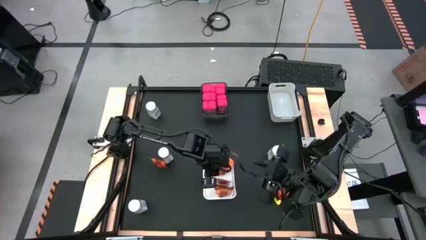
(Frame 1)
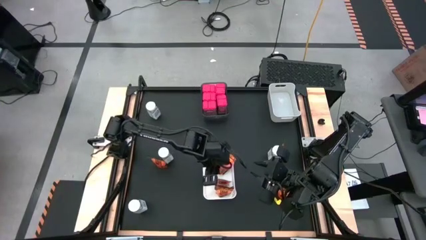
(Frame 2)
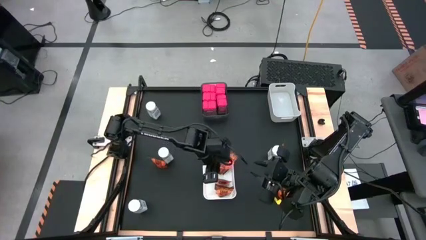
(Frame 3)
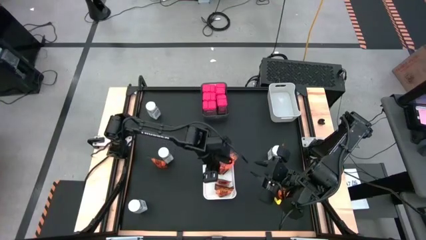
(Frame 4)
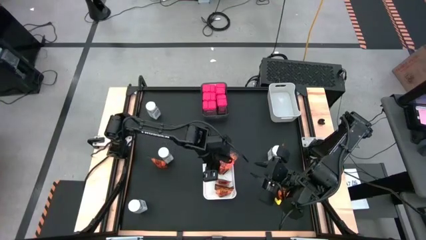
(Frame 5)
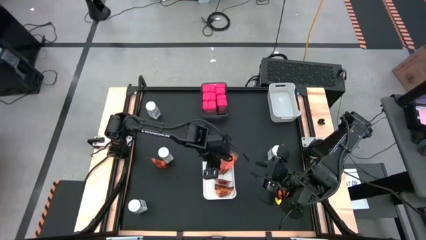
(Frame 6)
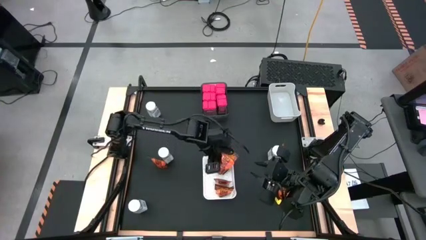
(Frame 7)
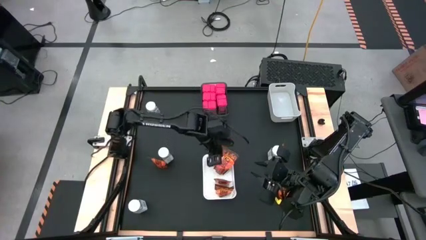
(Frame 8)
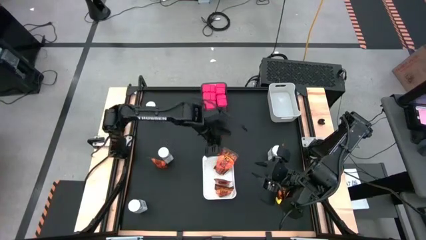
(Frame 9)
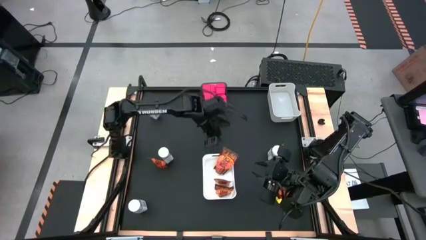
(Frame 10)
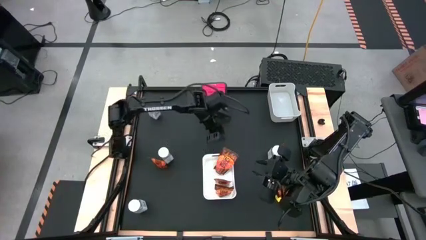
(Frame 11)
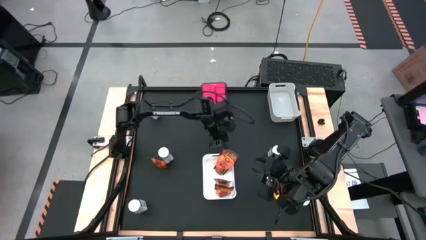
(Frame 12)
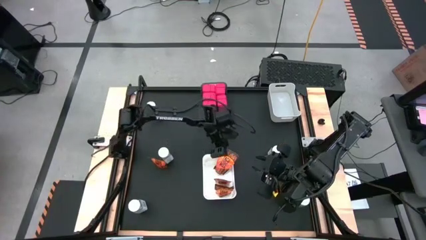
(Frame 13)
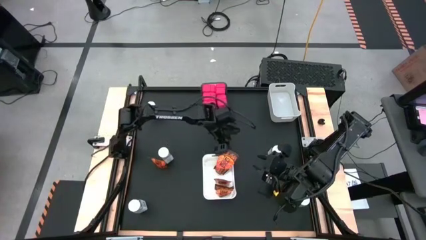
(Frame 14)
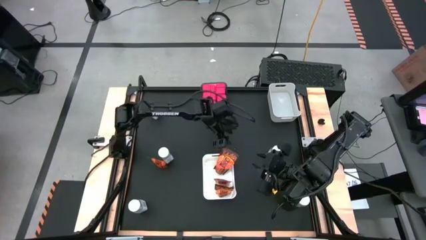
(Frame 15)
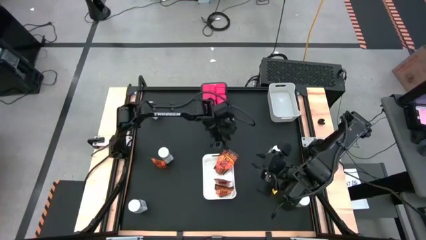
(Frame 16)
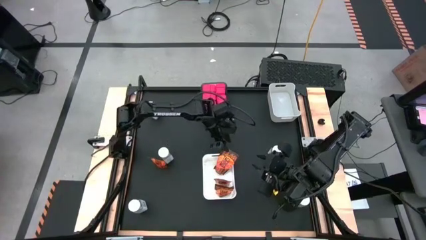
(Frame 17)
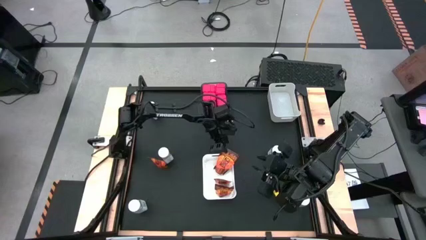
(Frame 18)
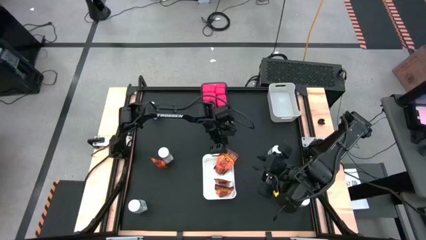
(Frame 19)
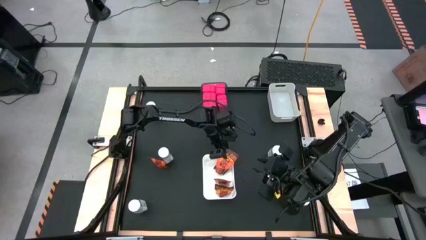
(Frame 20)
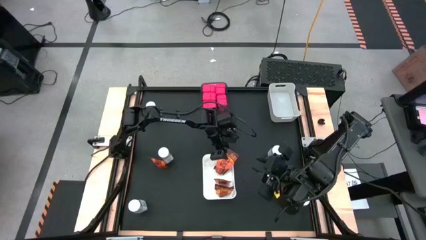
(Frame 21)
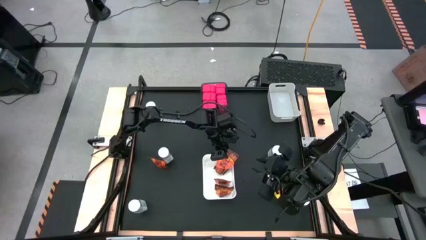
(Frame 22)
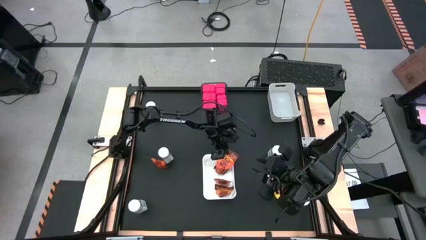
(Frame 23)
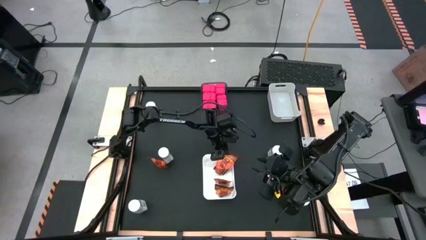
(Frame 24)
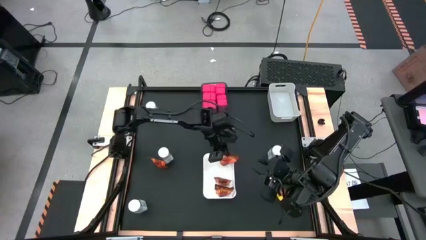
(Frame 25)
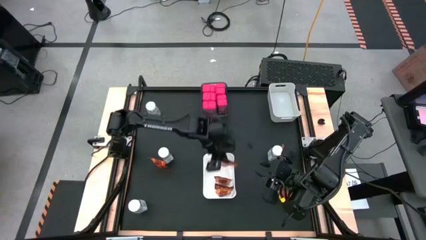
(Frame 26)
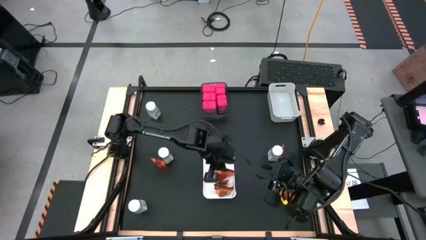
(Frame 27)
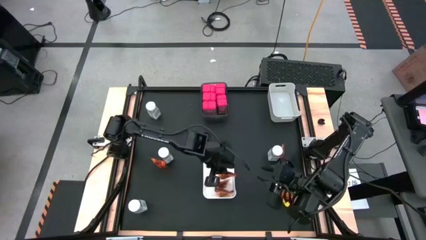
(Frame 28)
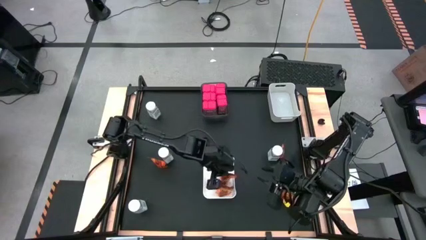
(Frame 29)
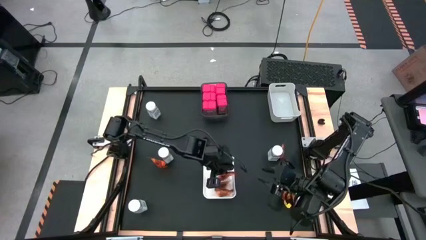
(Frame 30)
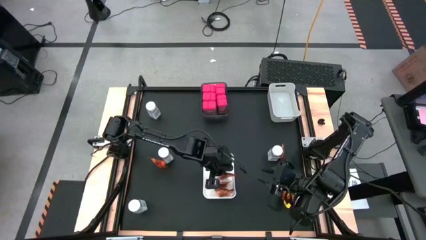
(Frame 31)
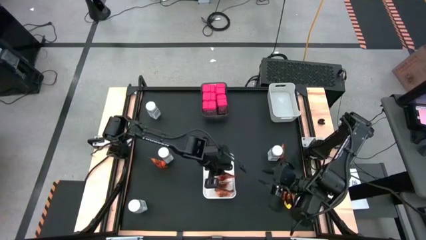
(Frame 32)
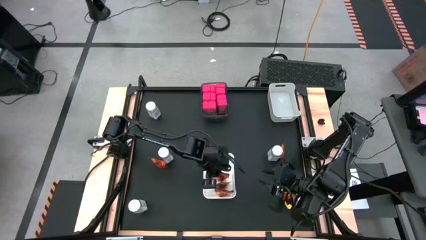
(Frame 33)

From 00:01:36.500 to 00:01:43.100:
Task: Sort spices by type
Put the orange seasoning pack into the white bin

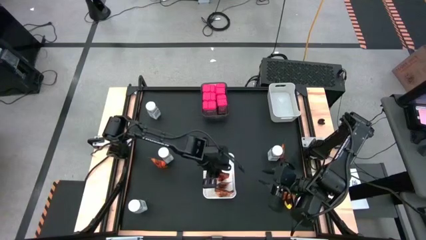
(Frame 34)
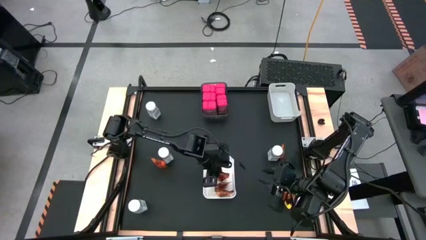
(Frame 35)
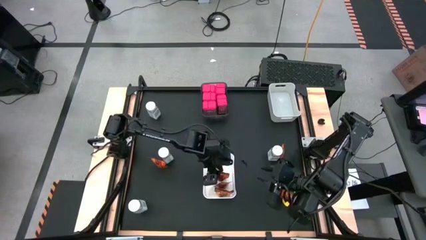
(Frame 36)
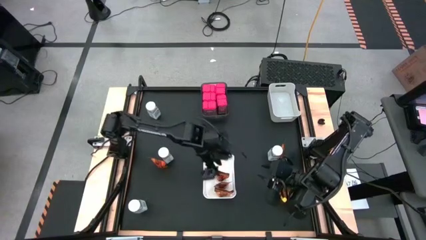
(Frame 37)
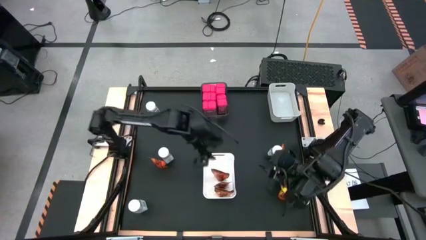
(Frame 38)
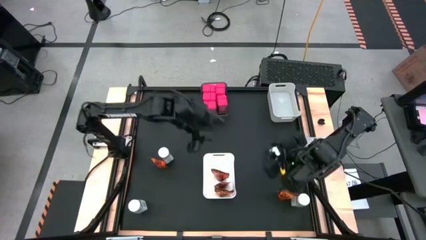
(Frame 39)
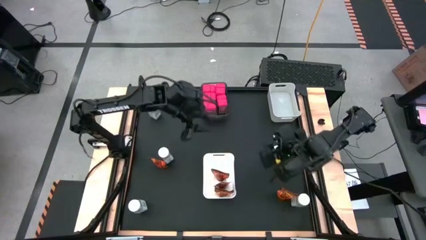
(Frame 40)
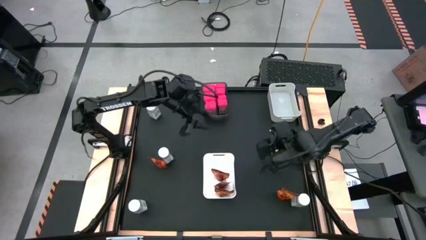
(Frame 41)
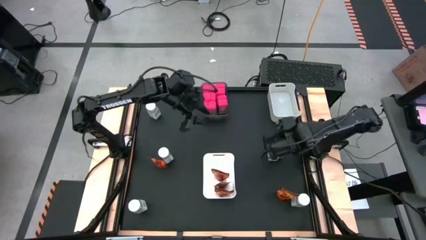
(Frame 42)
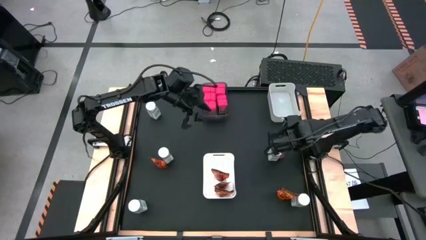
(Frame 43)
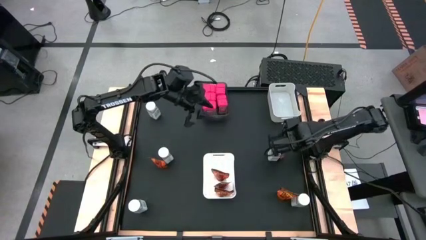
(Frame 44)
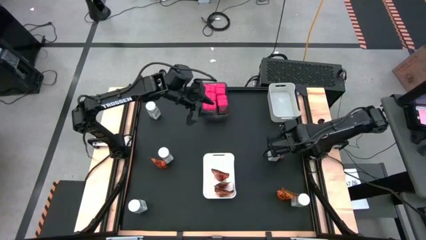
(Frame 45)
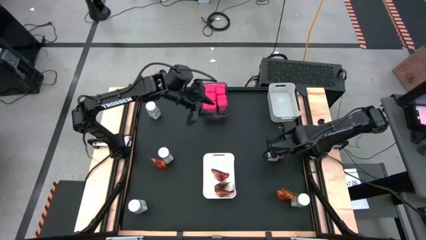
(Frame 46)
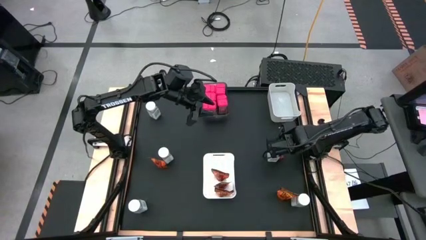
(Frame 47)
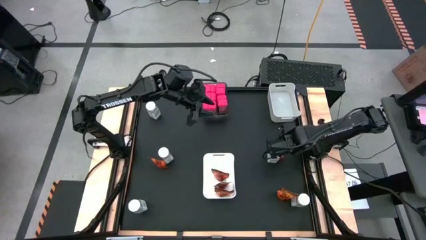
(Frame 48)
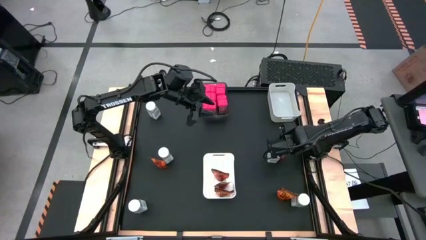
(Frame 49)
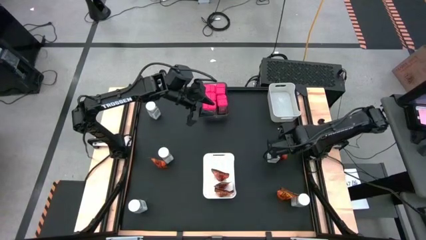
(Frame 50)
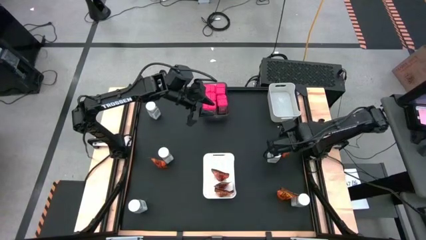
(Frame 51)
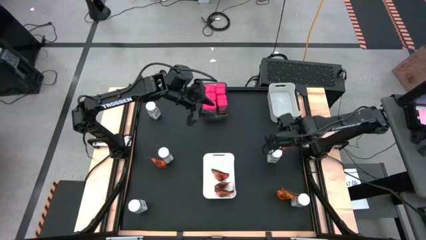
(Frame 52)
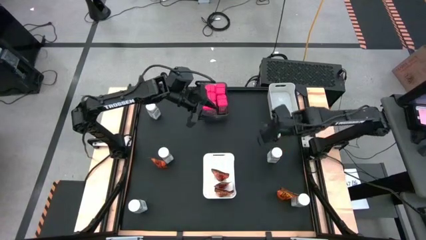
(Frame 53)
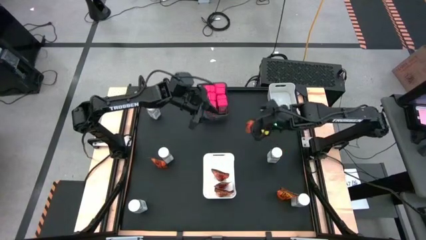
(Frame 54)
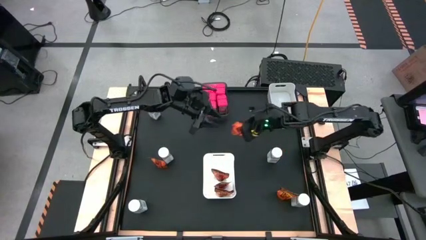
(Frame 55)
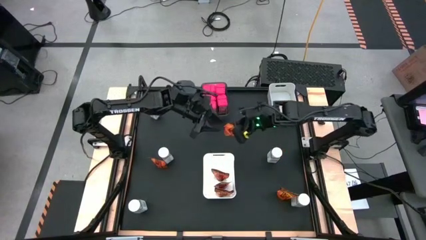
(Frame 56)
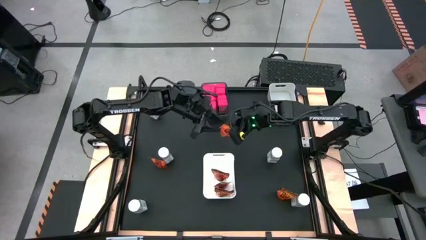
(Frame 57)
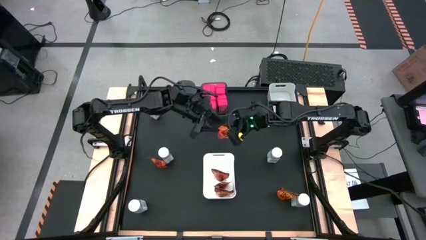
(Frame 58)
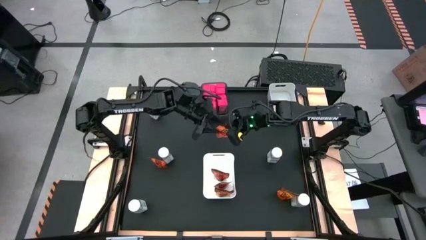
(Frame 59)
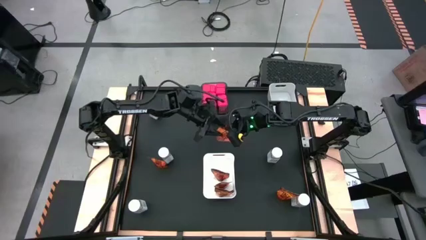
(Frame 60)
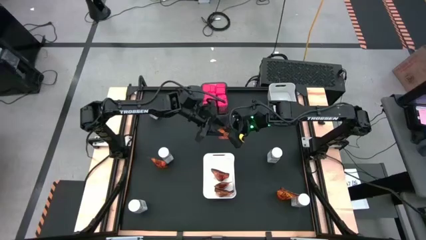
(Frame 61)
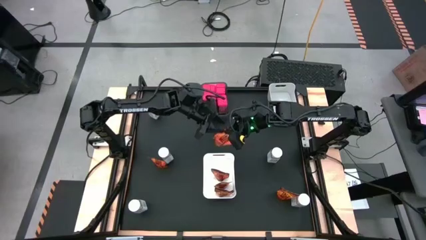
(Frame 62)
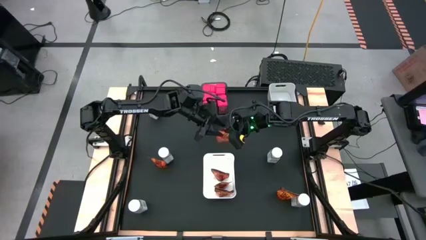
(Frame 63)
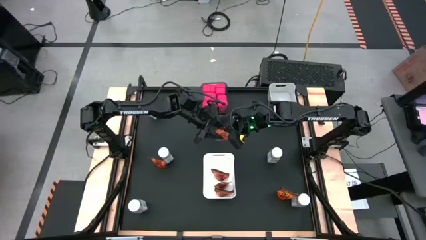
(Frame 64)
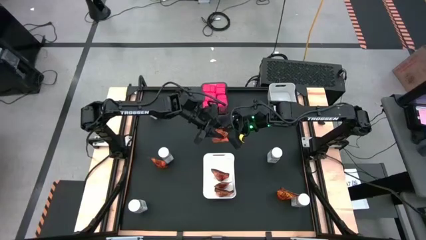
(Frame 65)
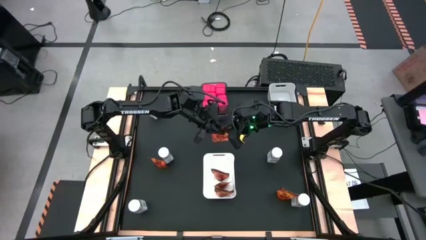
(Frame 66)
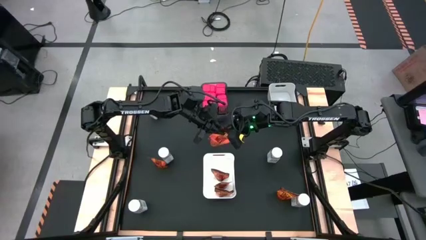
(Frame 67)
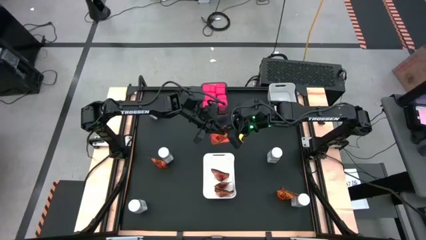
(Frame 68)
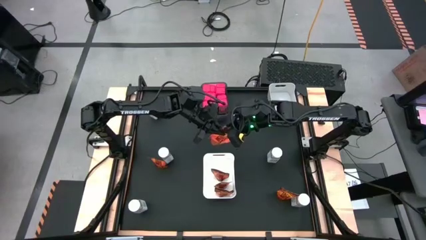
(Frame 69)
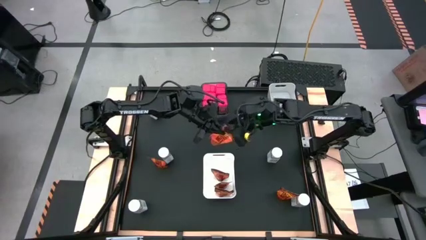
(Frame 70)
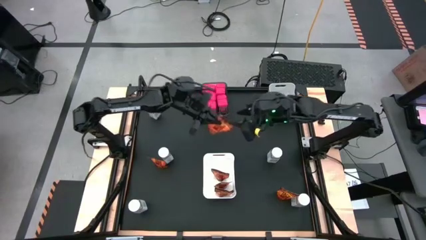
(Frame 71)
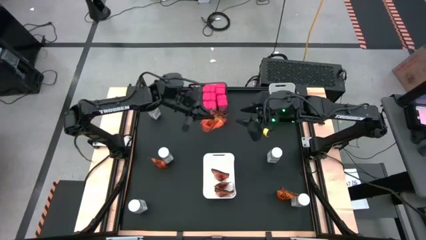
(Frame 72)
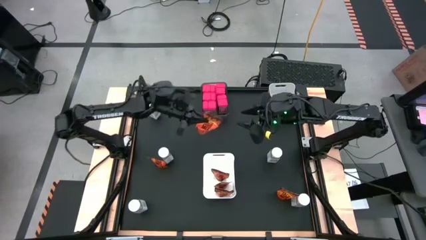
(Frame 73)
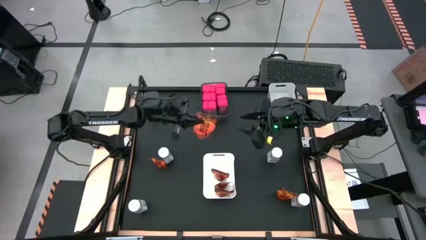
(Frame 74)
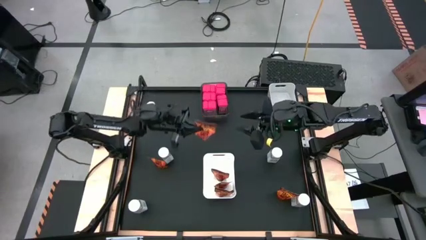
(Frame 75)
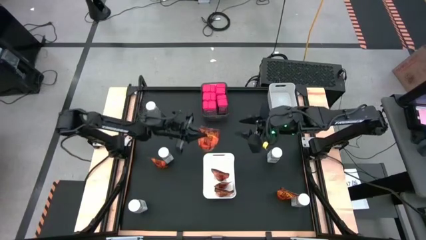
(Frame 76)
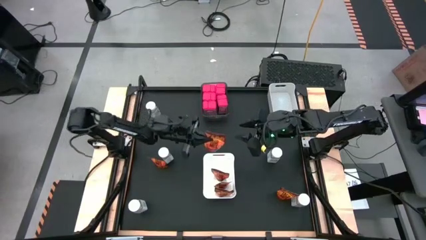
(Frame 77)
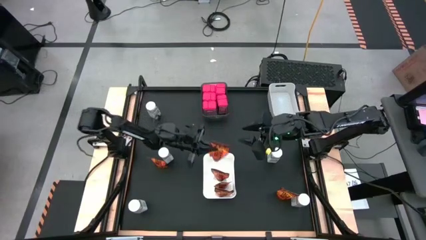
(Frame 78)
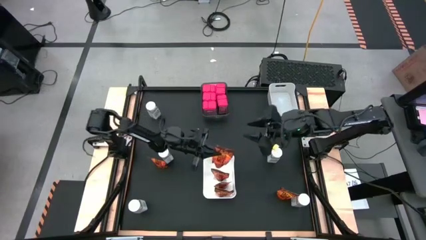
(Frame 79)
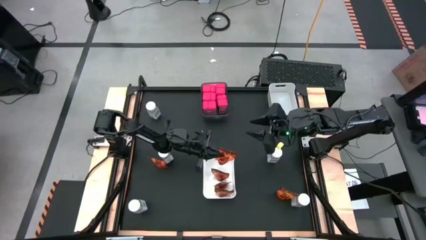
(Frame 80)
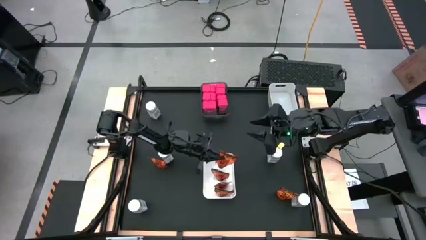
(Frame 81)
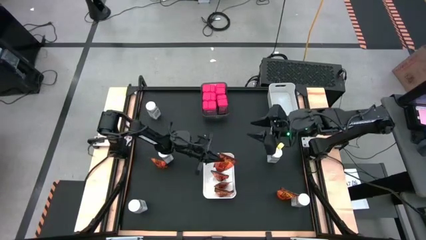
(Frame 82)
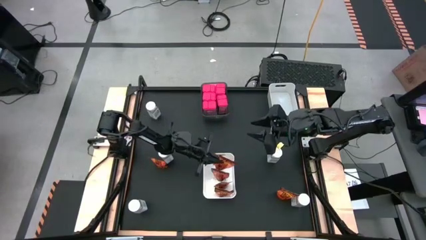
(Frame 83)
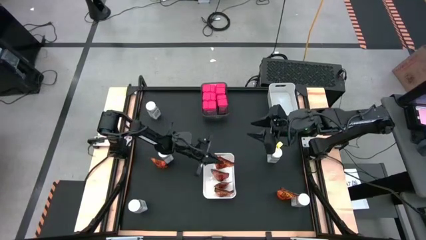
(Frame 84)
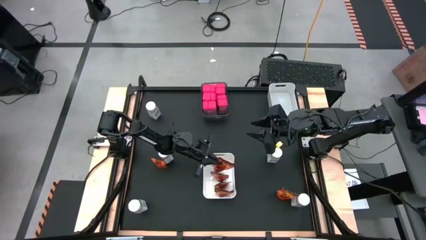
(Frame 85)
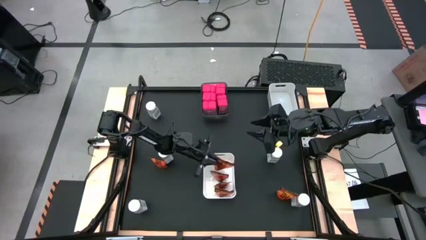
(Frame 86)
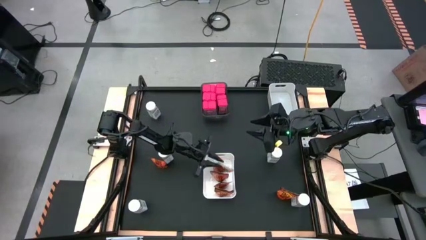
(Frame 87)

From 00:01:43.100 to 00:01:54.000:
Put the orange seasoning pack into the white bin
